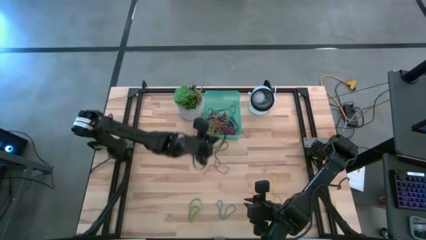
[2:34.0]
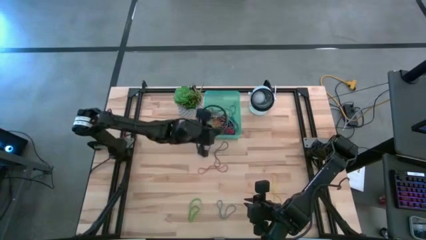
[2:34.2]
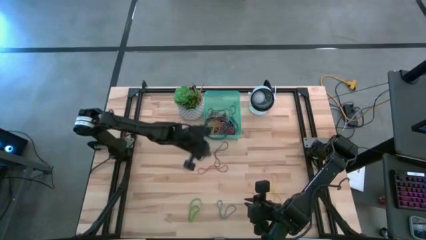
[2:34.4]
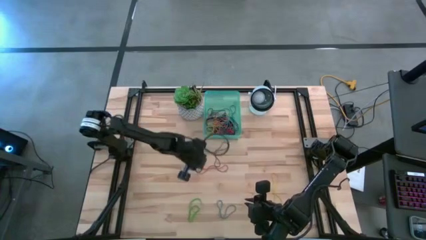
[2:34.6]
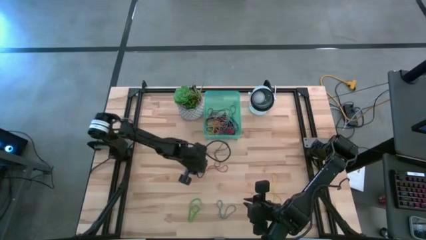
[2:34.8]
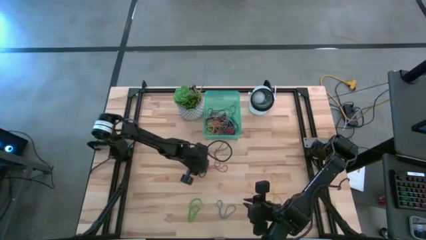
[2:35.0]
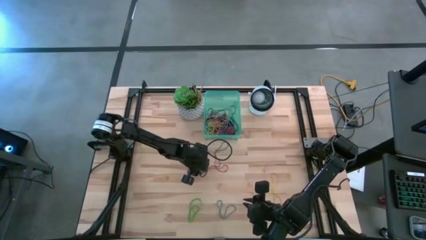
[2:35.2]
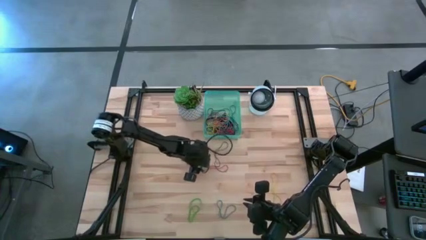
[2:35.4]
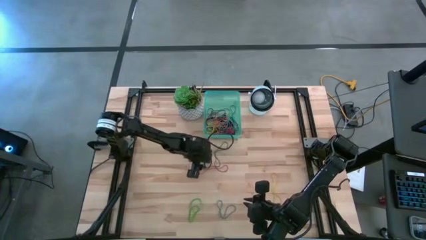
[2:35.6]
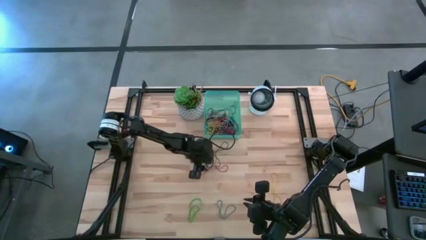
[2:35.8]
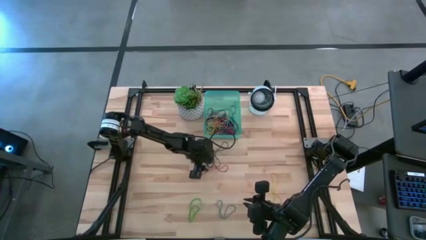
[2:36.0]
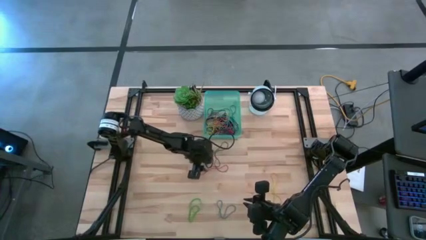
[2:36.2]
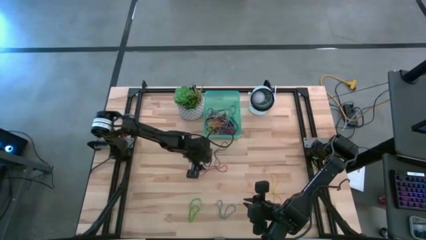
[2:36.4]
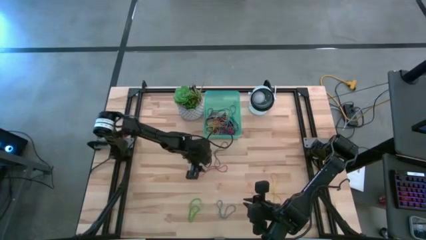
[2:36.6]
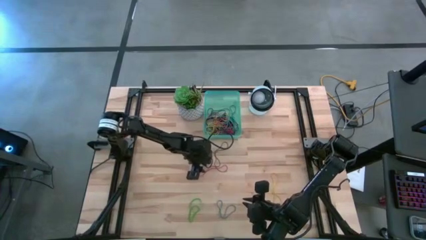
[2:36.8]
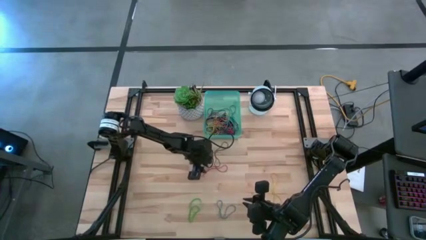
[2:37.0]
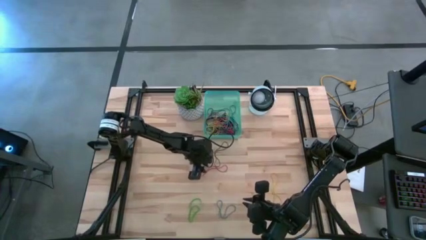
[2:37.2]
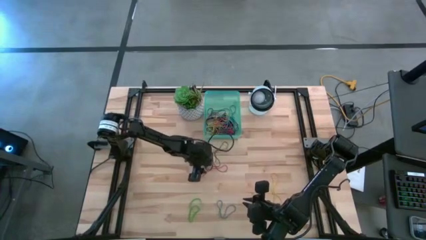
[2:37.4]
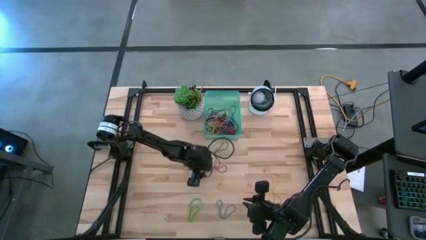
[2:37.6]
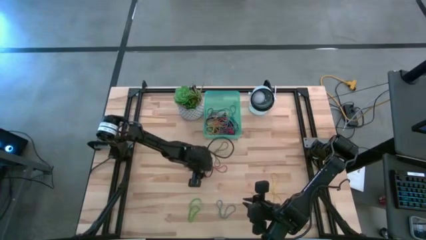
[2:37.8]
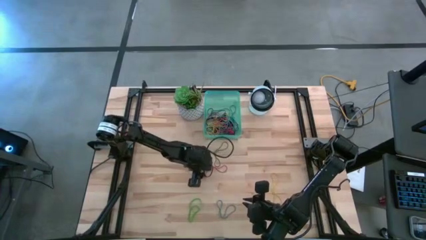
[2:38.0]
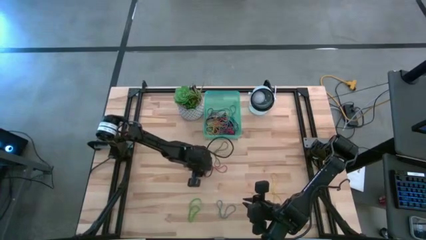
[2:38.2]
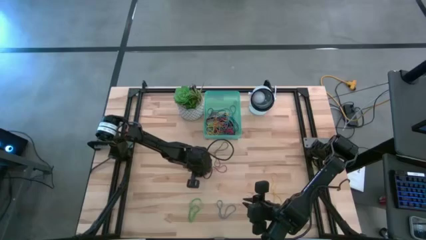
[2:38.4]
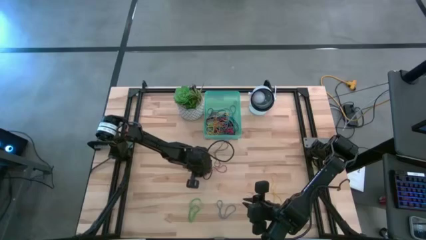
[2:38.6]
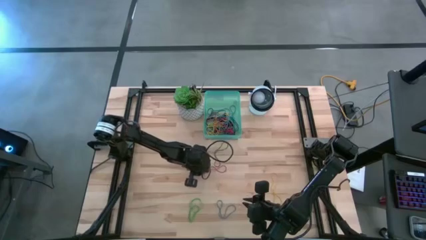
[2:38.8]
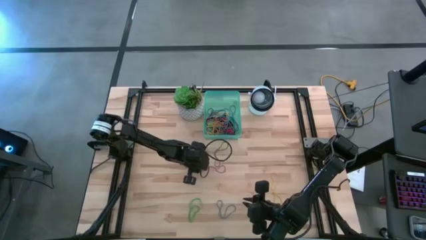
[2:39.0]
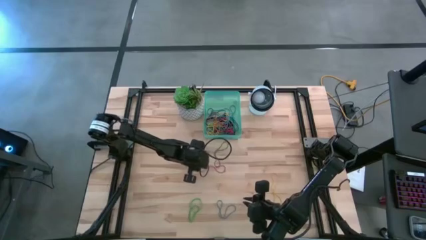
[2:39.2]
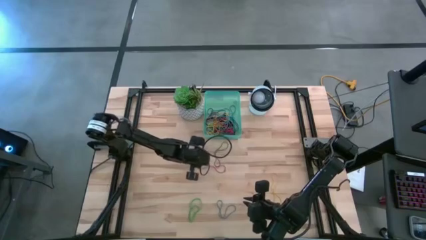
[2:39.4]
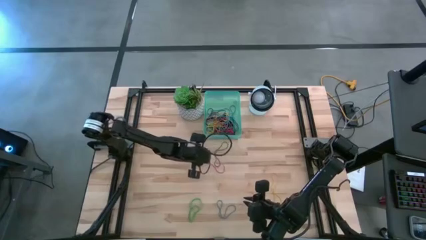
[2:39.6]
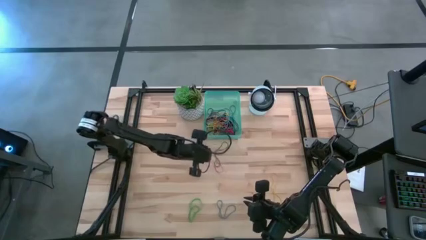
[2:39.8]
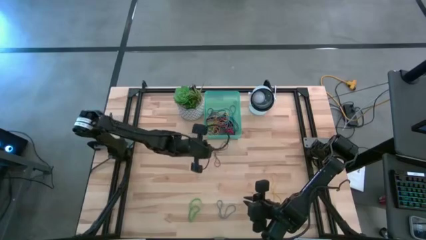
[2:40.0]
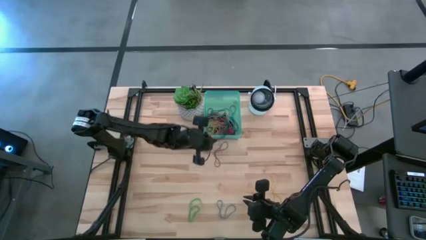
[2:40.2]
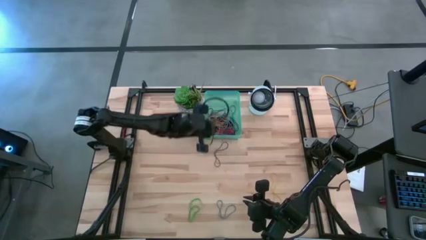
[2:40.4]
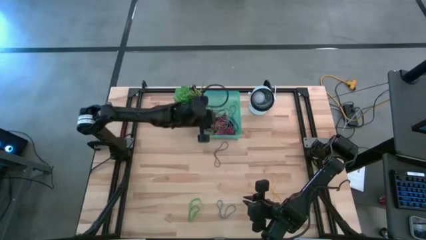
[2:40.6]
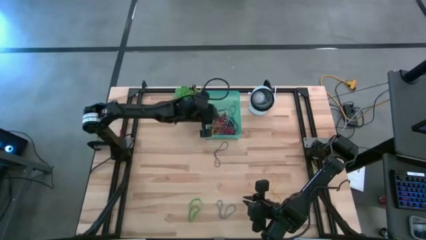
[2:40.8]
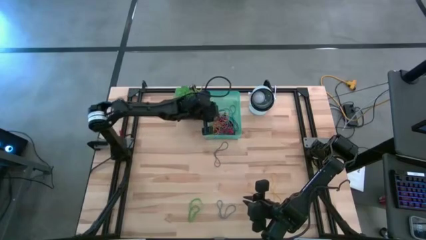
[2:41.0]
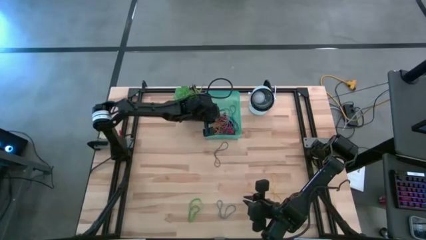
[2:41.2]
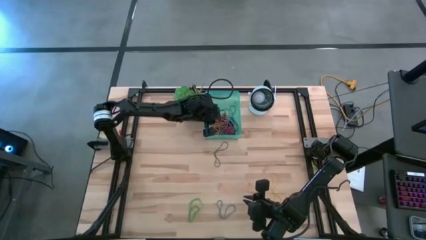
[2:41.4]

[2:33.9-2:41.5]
Task: Pick and place rubber bands into bin
Put the red rubber band into the green bin

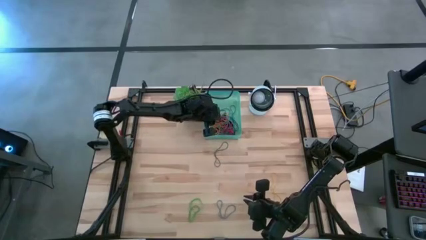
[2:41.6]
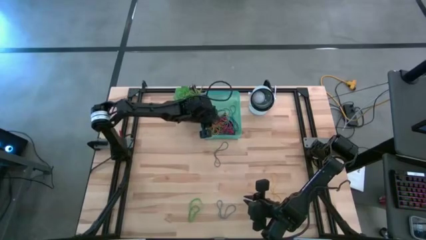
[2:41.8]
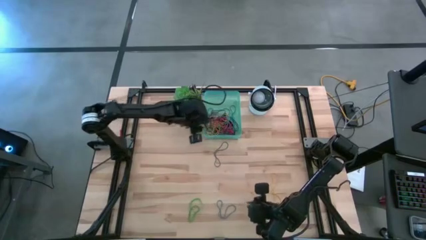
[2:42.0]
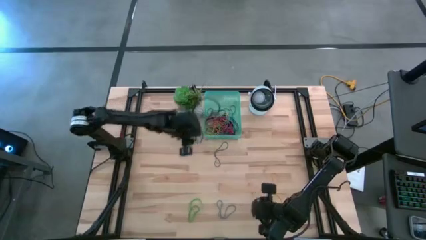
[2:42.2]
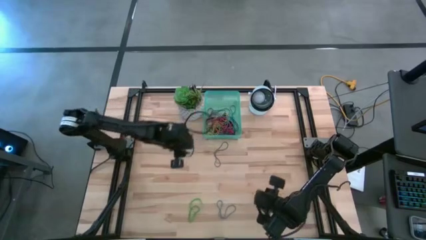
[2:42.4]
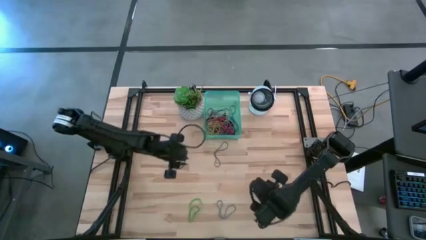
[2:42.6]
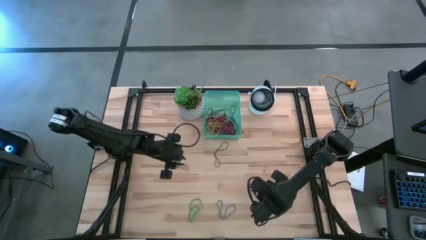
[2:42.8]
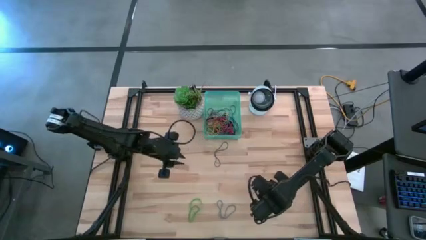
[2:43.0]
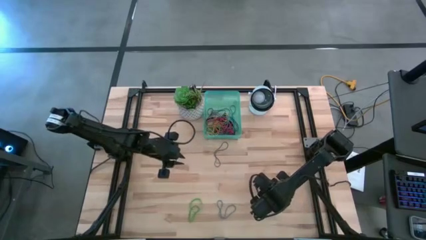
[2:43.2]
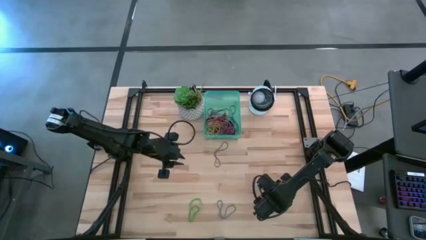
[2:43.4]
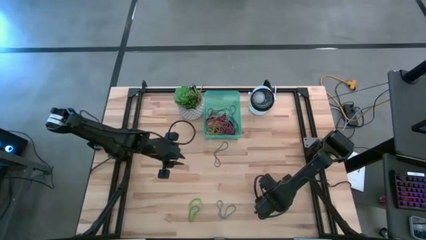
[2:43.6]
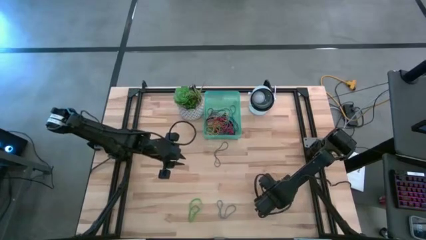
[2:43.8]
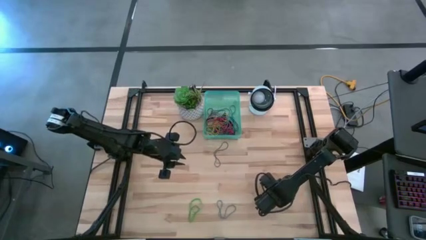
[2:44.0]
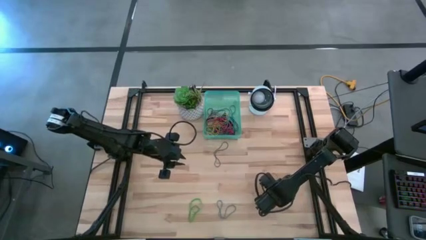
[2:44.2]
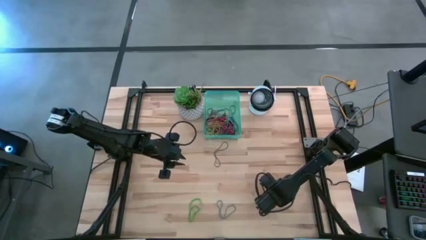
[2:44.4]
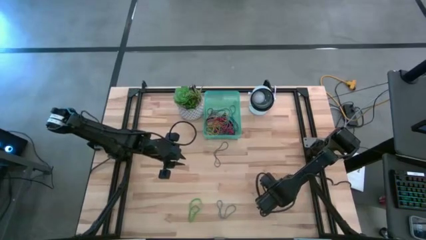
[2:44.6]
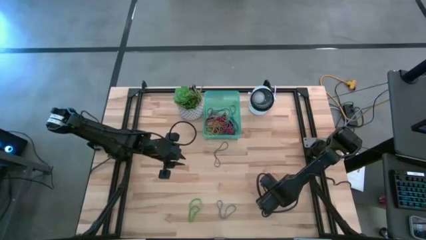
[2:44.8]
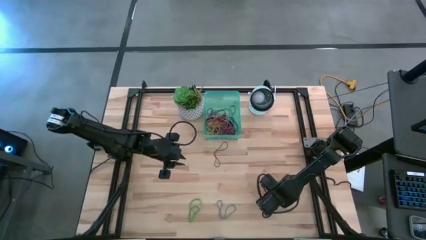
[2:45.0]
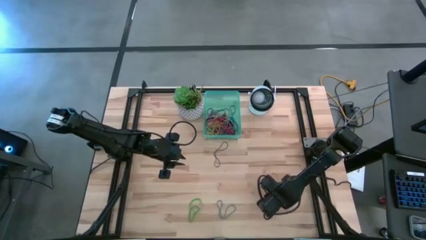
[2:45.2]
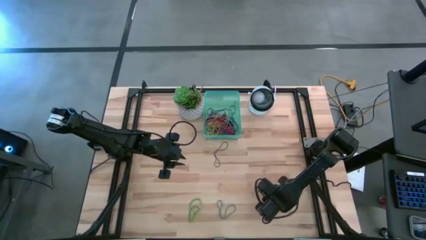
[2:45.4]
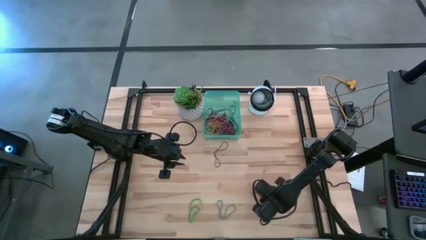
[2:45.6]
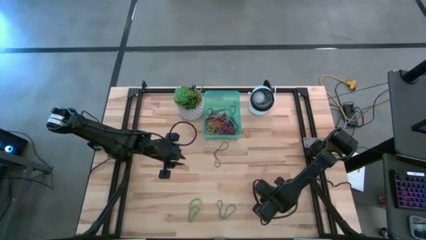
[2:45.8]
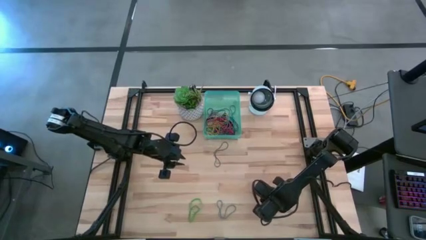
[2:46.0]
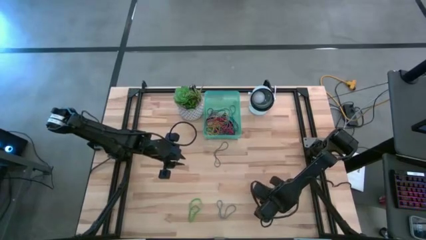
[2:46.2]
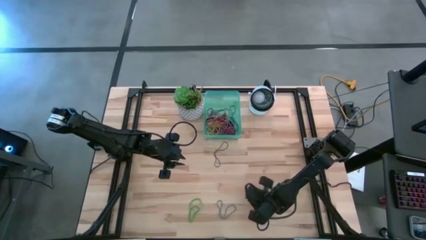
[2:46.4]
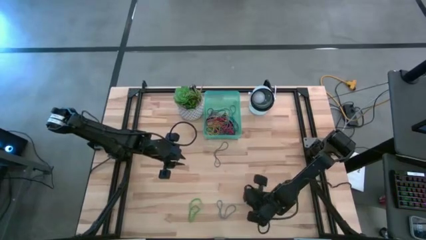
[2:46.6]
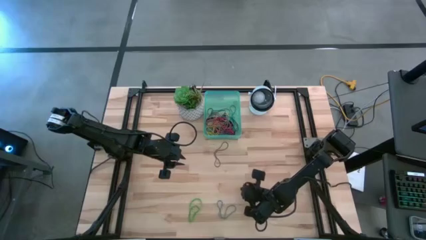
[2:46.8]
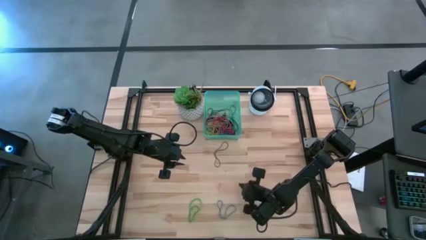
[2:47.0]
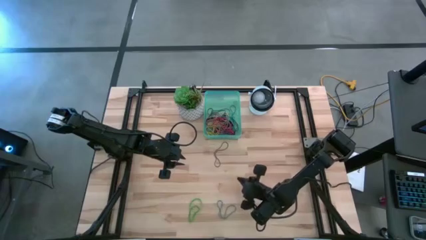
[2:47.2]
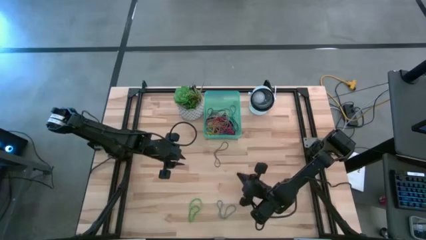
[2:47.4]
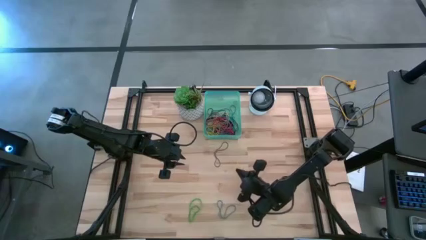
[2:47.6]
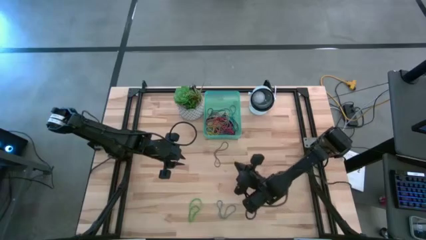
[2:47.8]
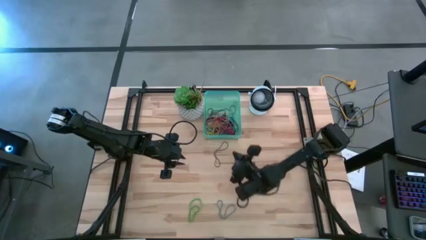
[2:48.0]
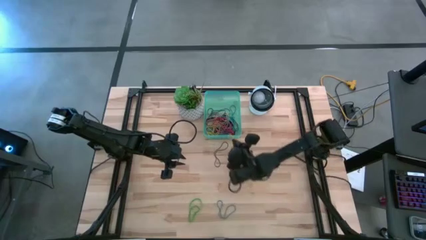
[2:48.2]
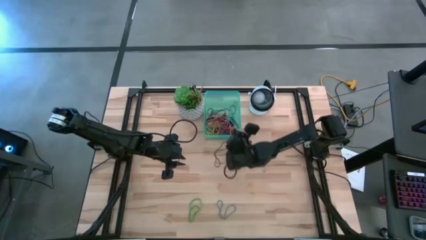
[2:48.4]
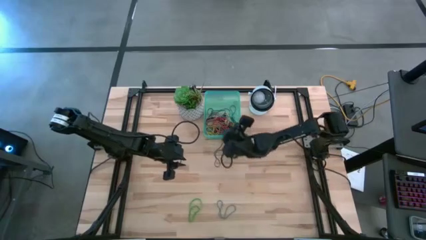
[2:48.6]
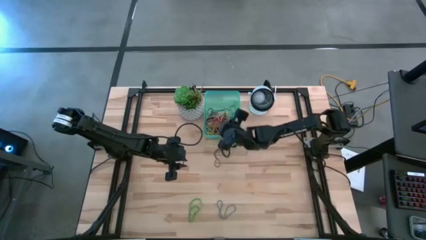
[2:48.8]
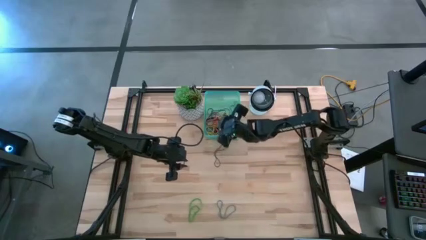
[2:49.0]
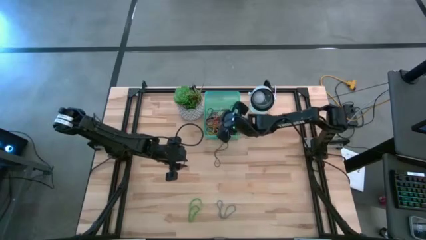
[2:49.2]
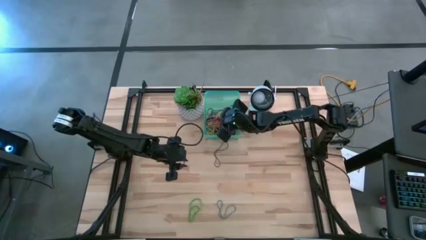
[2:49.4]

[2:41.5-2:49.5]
Put the yellow rubber band into the green bin

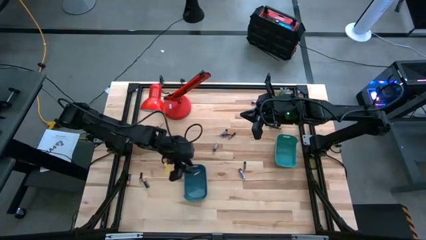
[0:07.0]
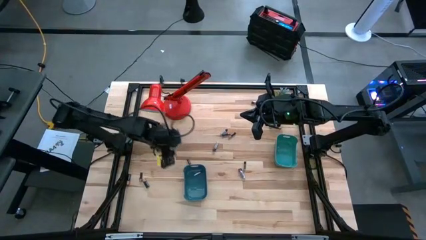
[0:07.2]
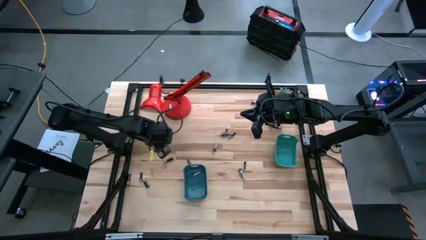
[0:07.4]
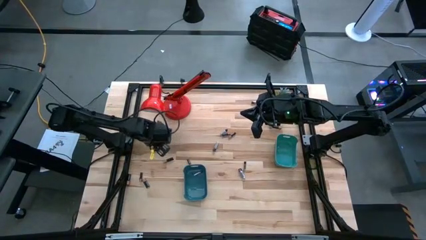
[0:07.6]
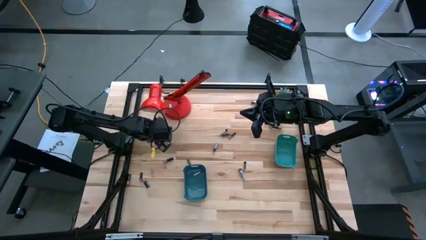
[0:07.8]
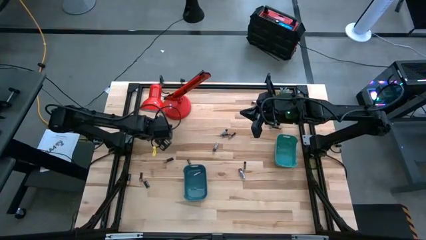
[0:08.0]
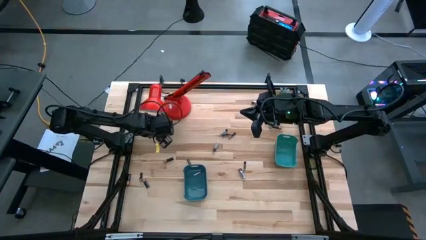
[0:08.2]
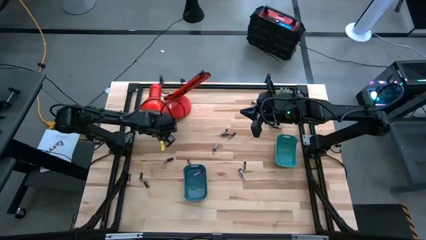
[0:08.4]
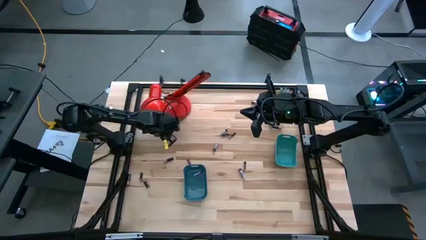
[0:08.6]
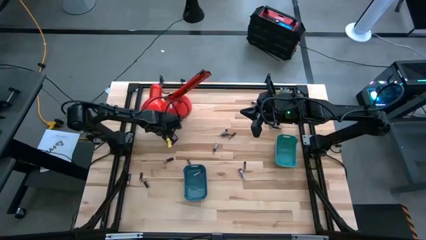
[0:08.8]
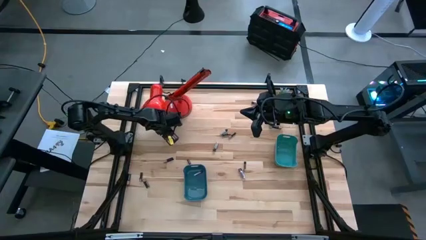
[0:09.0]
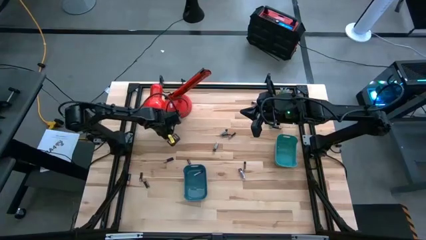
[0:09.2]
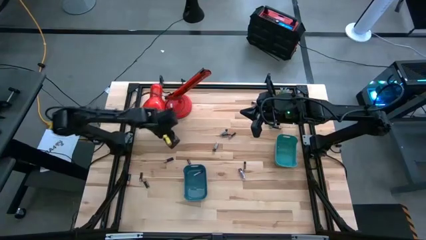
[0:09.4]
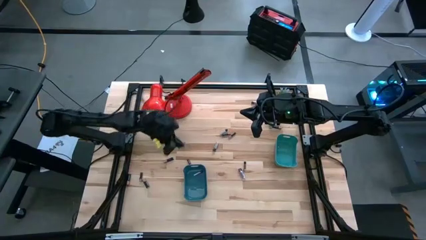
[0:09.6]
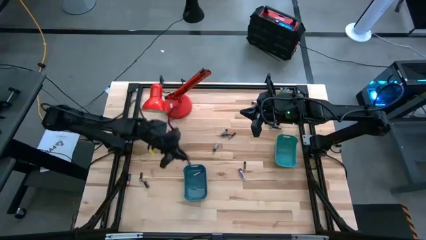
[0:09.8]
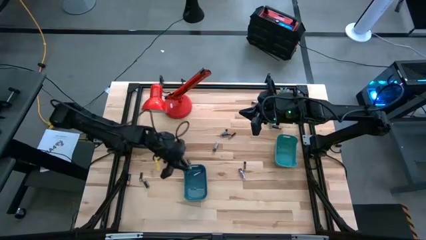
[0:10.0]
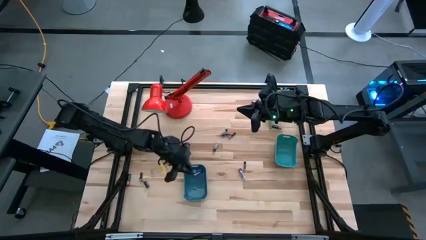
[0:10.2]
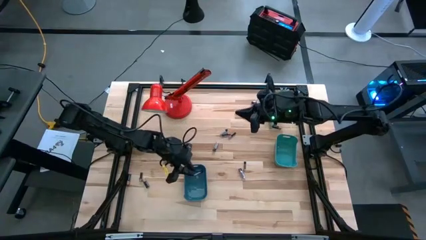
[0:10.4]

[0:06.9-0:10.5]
Task: Sort batteries
Put the silver battery into the blue bin
